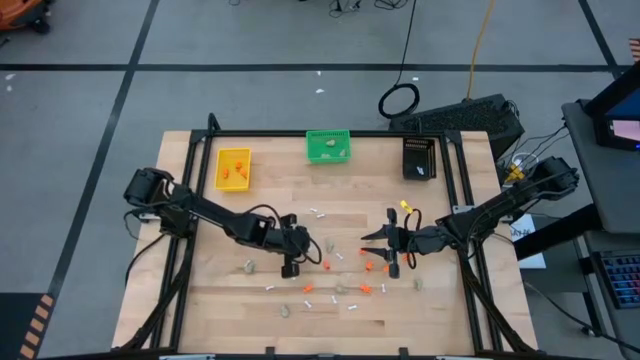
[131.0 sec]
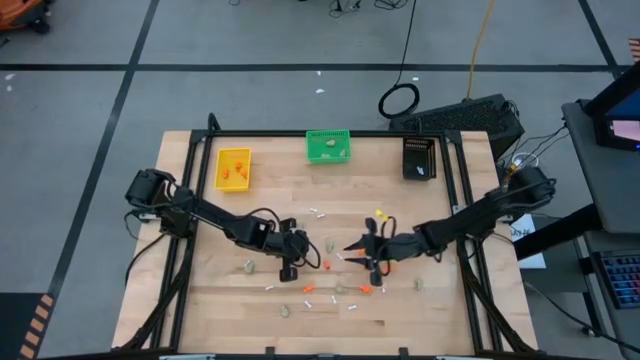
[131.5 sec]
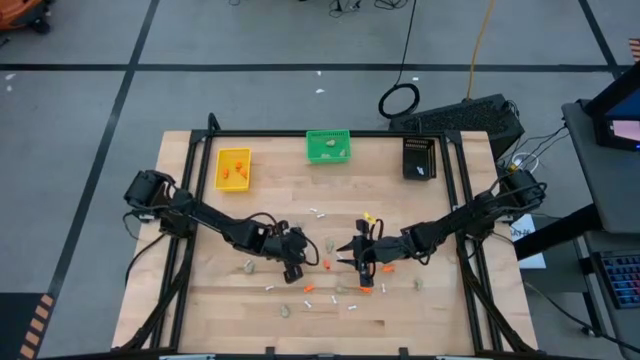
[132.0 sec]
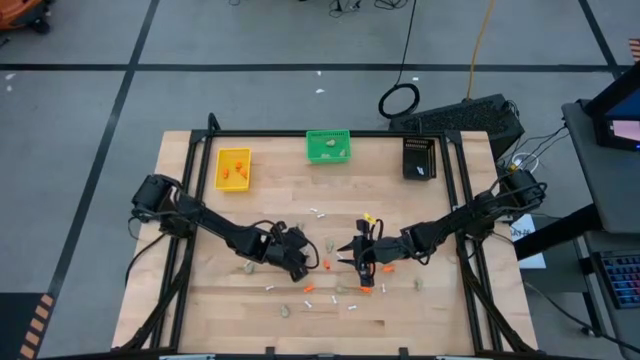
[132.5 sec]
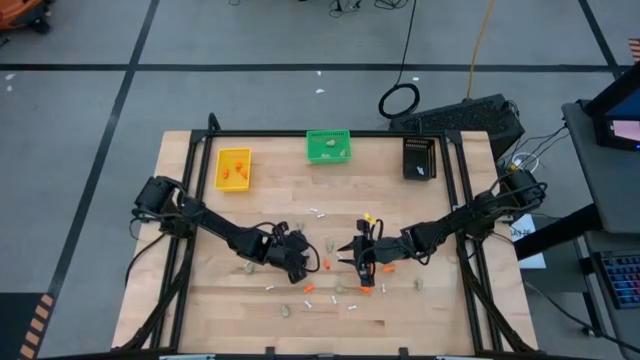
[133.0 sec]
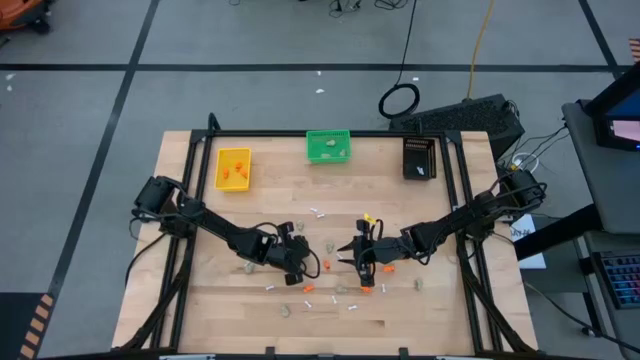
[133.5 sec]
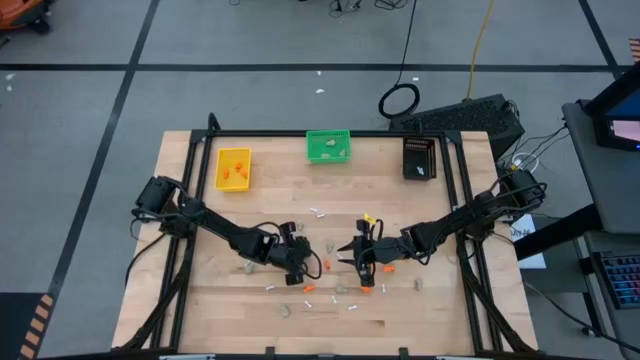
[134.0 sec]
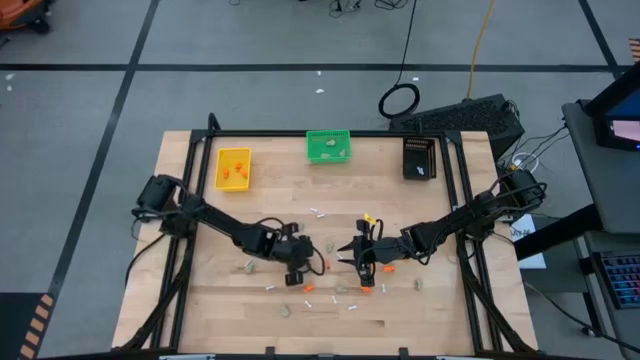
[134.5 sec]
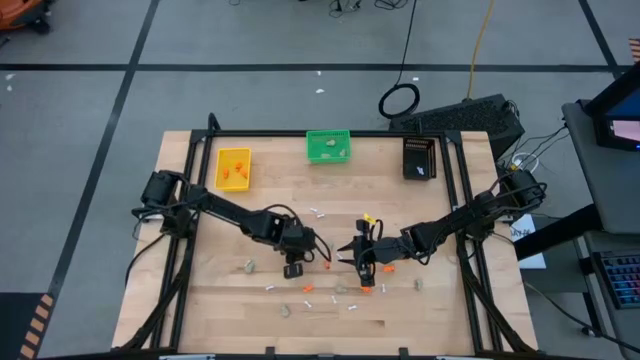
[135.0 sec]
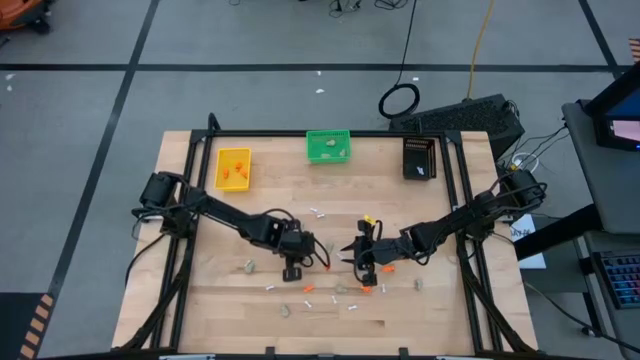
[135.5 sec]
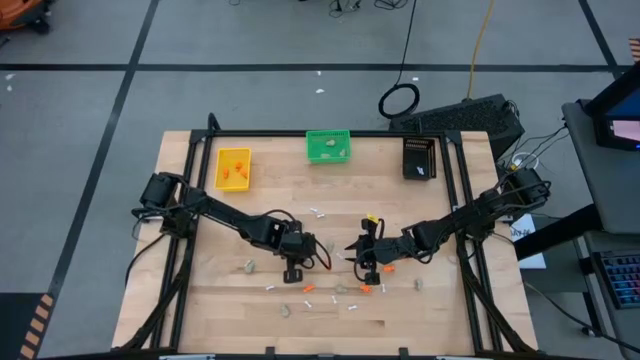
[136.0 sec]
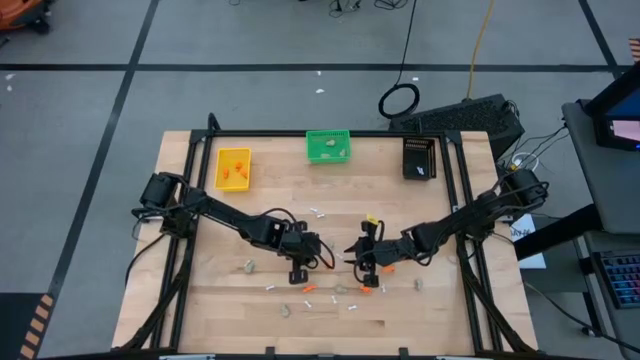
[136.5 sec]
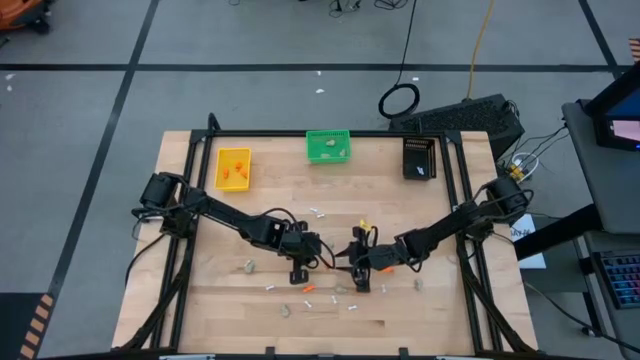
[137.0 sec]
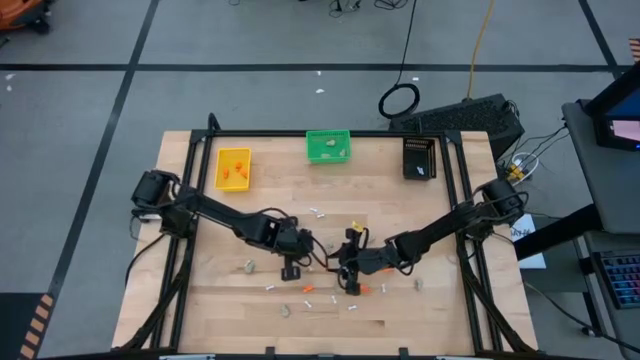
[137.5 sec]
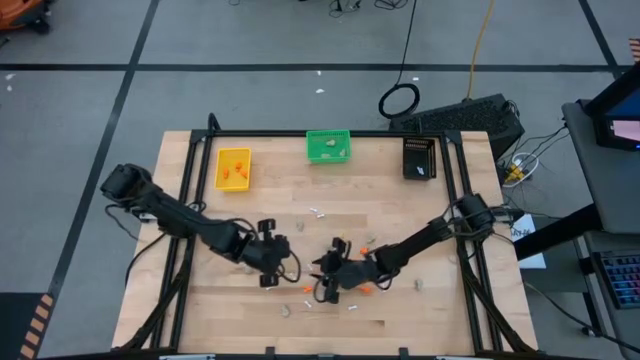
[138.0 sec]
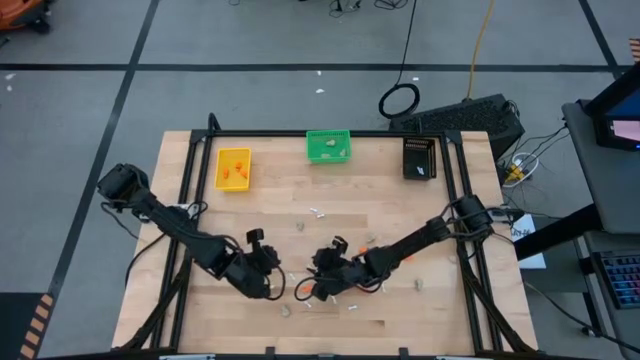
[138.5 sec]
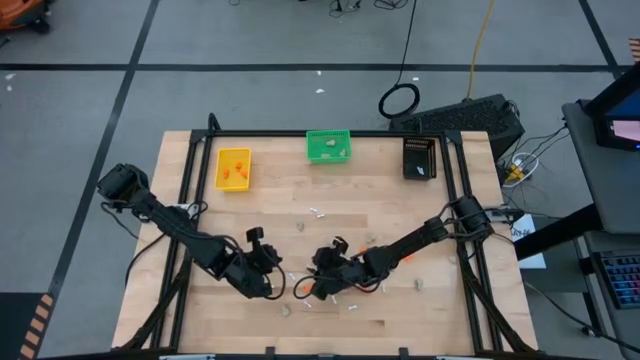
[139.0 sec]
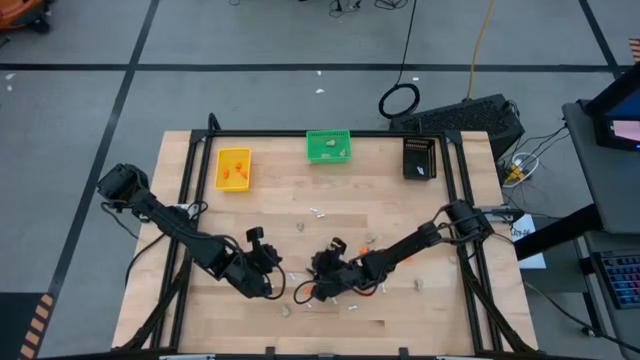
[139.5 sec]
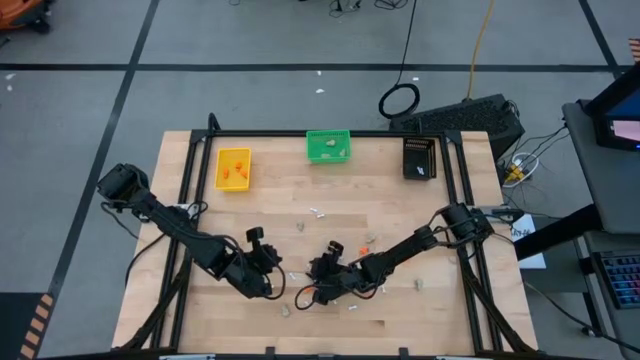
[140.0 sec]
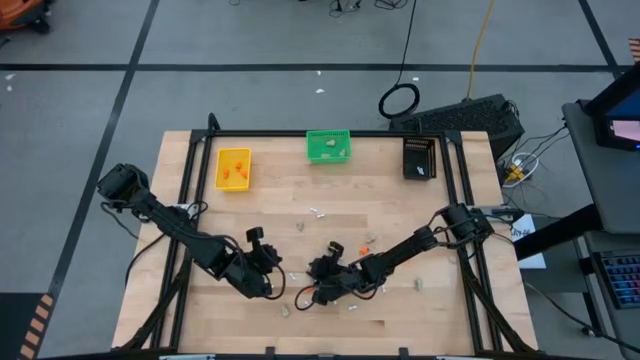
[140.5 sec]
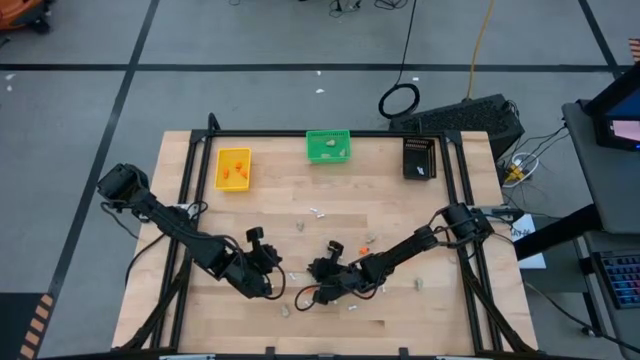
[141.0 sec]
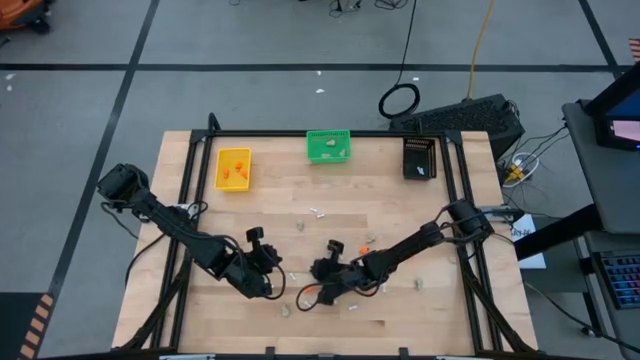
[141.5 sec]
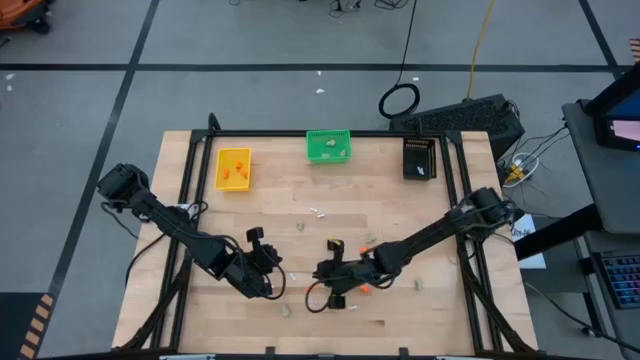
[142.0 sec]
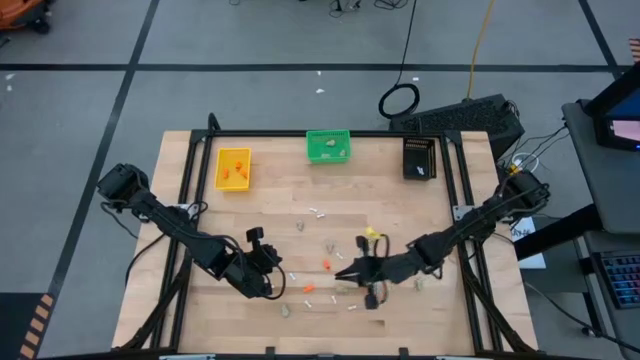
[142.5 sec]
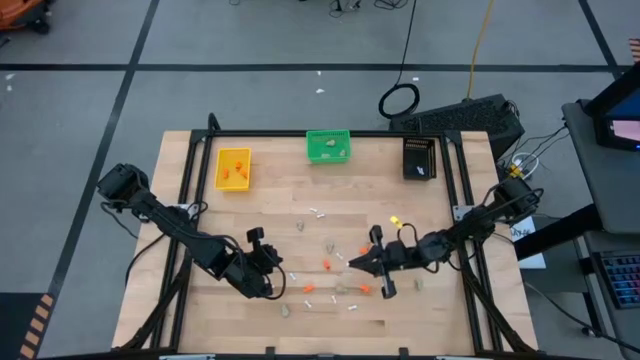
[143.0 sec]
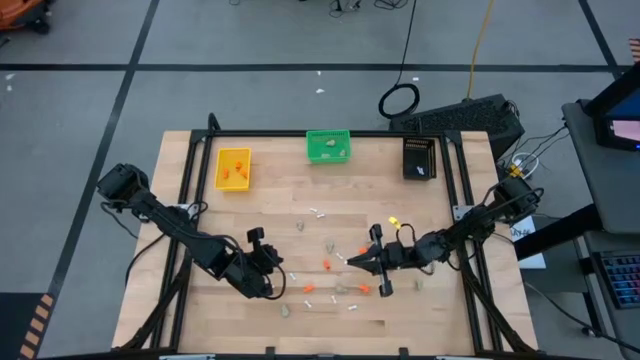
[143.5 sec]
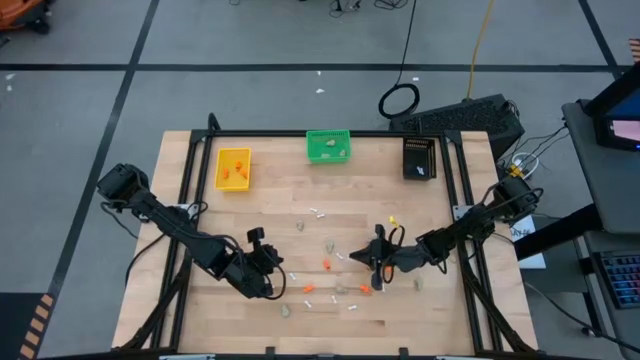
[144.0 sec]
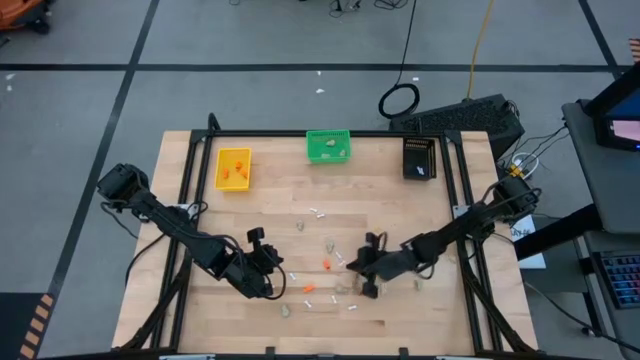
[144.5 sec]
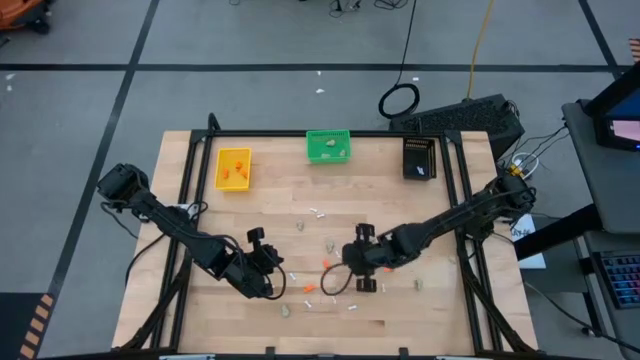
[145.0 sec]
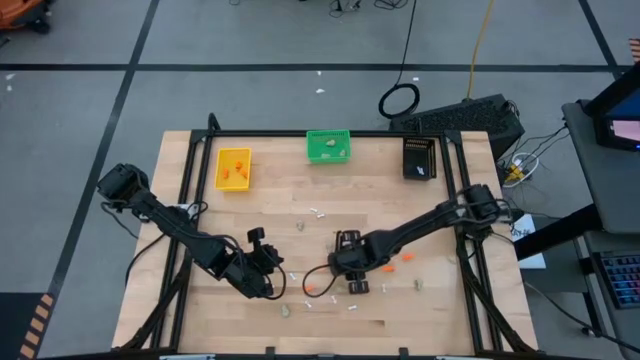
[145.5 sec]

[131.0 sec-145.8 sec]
Task: Sort Halloween decoration
Put the white bone toy into the black bin

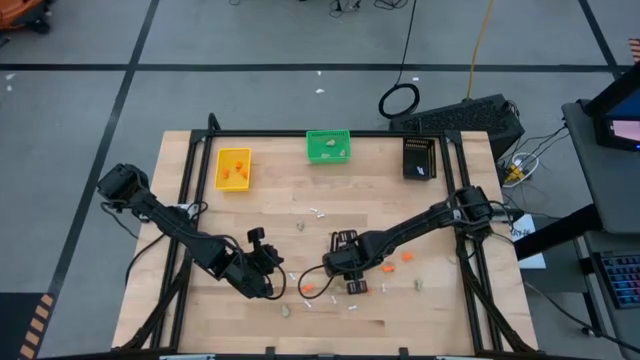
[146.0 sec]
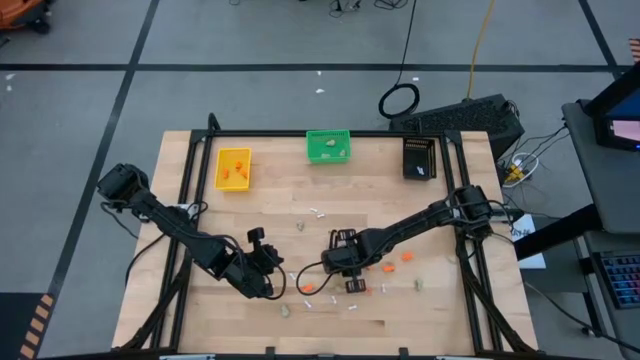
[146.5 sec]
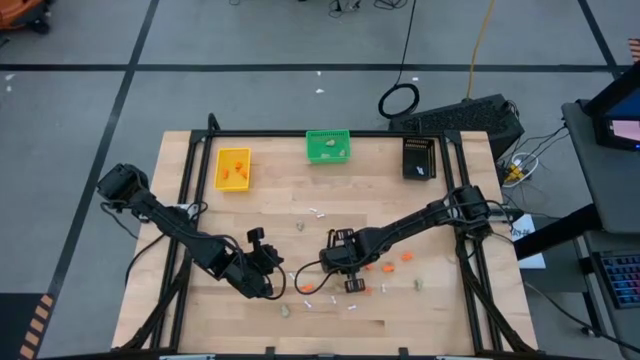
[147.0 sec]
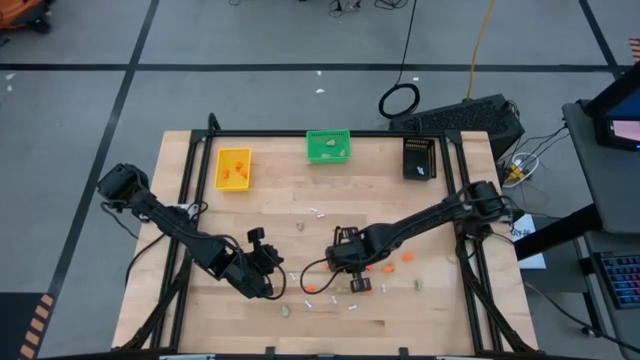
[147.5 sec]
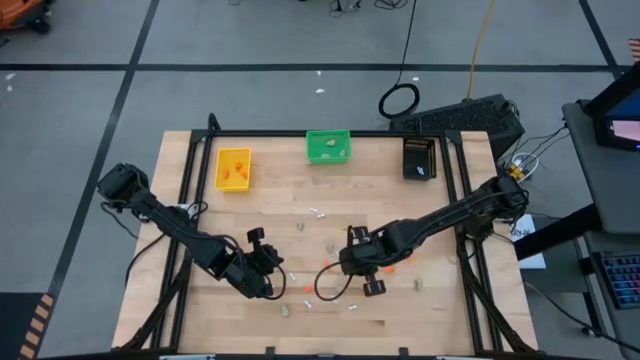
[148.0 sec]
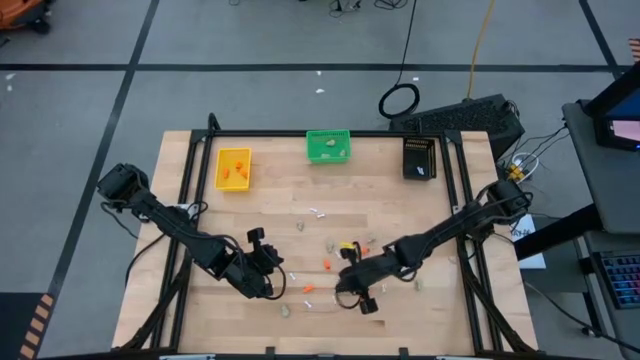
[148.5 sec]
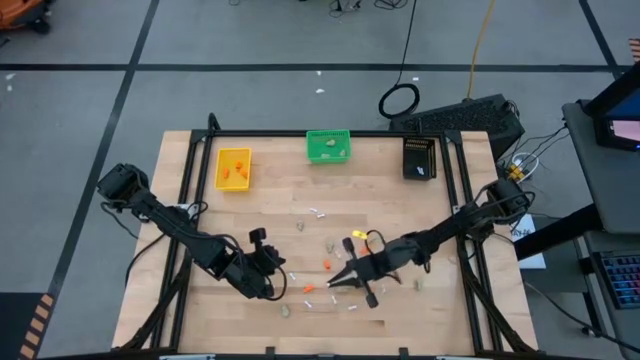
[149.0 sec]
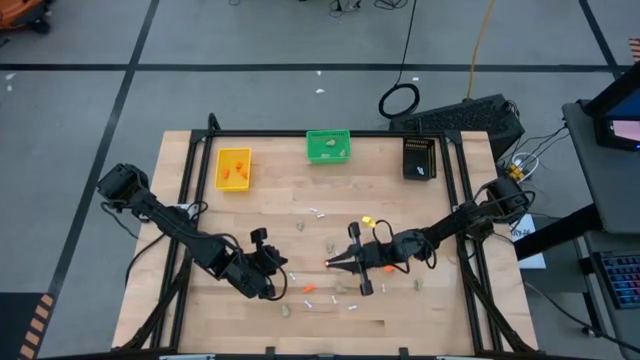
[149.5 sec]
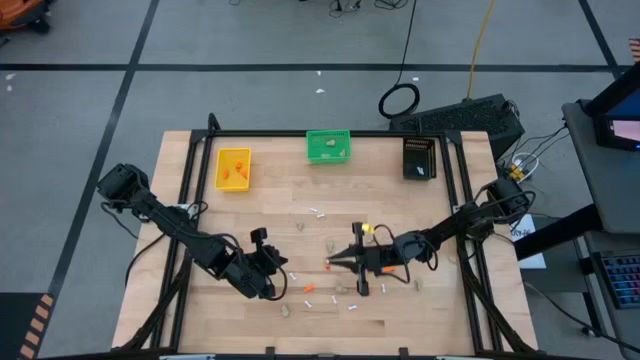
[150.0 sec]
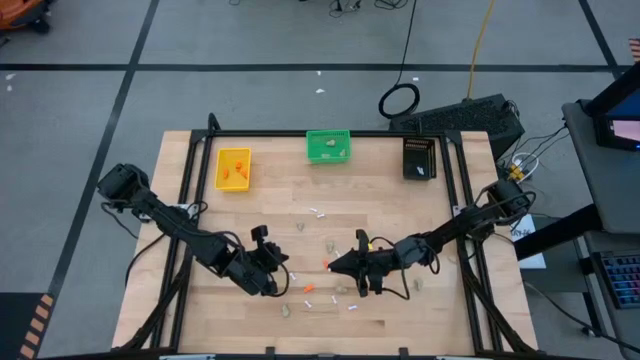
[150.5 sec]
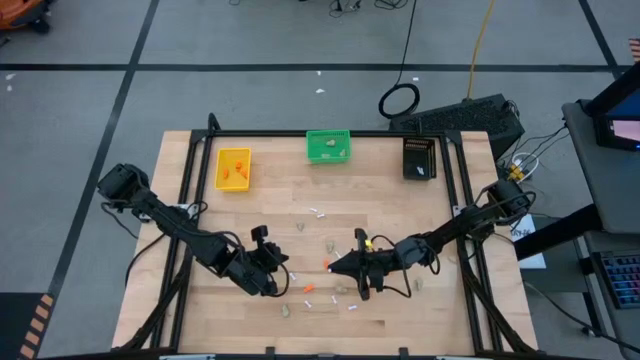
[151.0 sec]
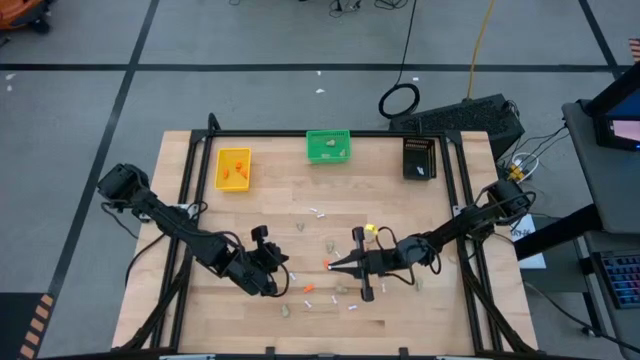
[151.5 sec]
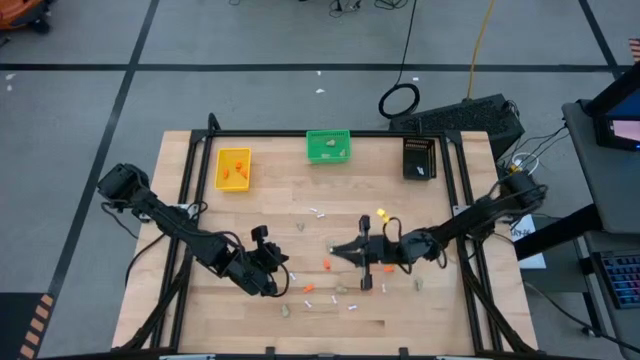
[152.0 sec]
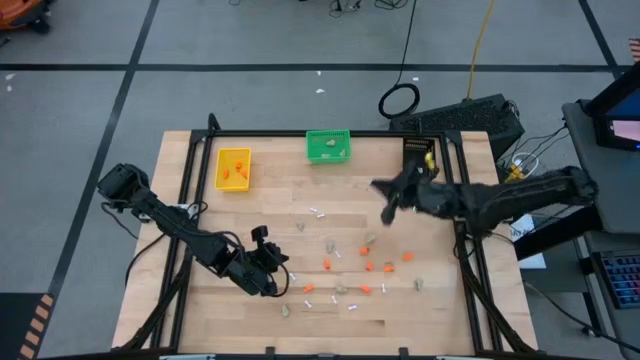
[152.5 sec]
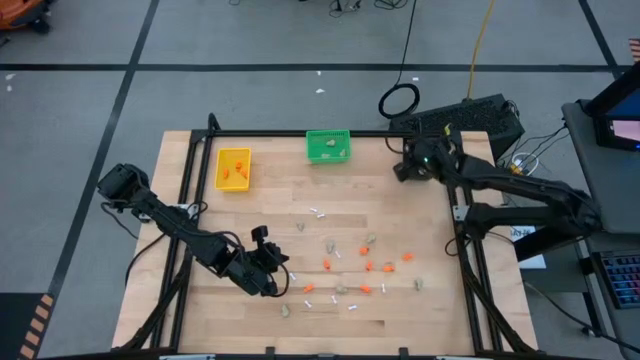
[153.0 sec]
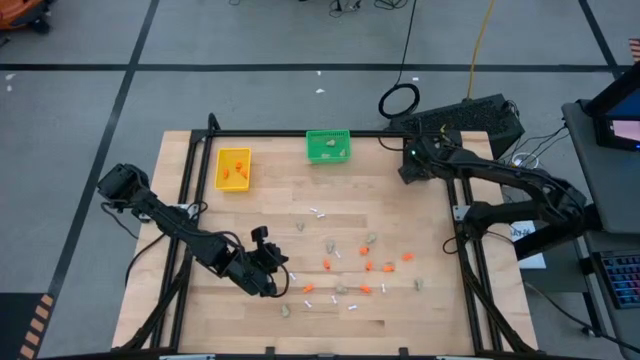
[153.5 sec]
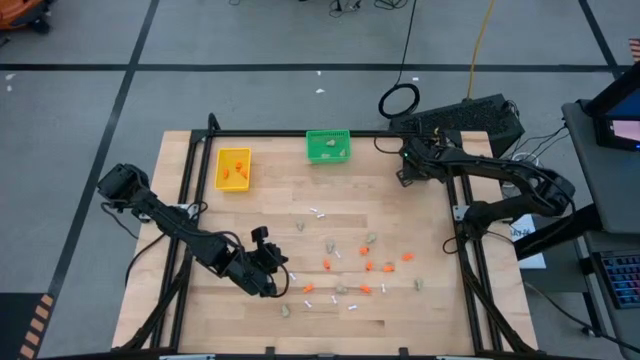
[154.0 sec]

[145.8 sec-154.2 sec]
Put the white bone toy into the black bin
